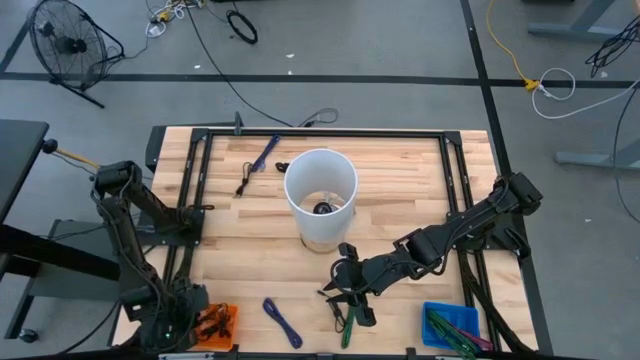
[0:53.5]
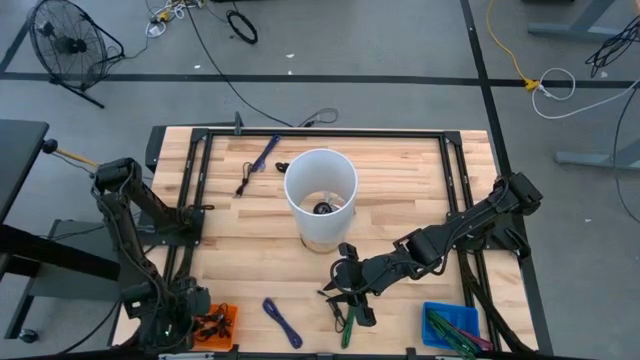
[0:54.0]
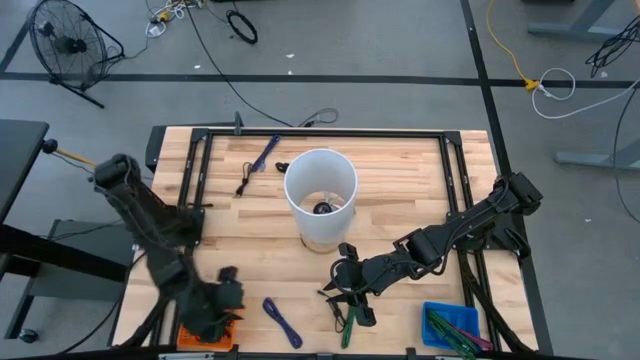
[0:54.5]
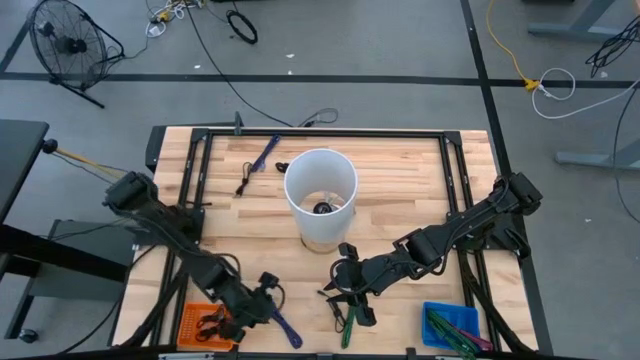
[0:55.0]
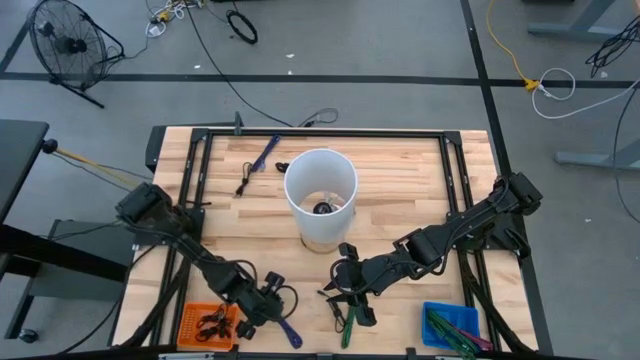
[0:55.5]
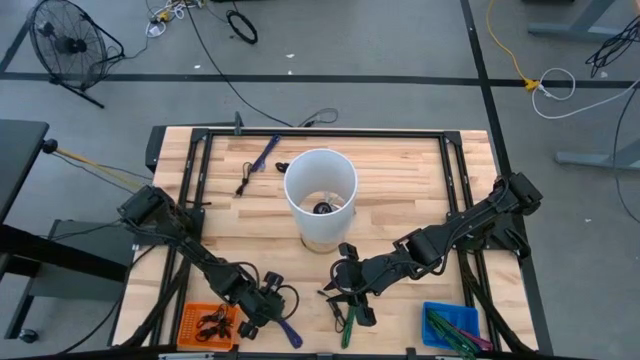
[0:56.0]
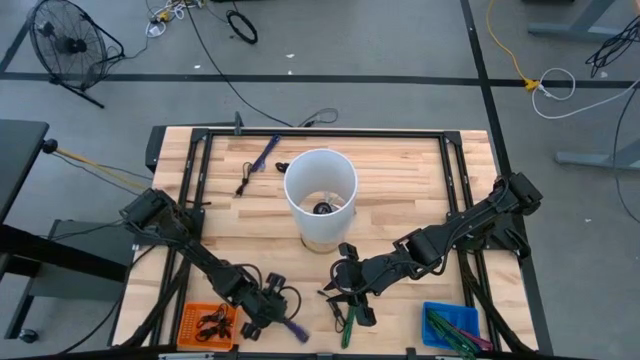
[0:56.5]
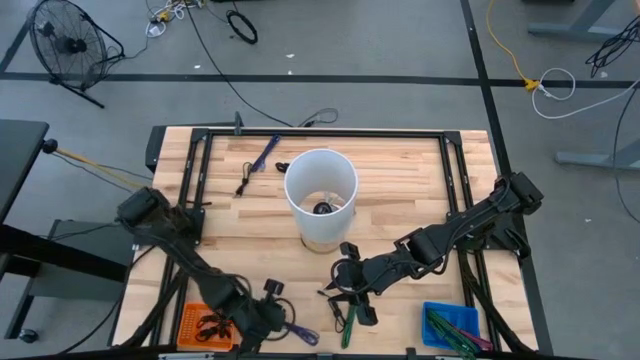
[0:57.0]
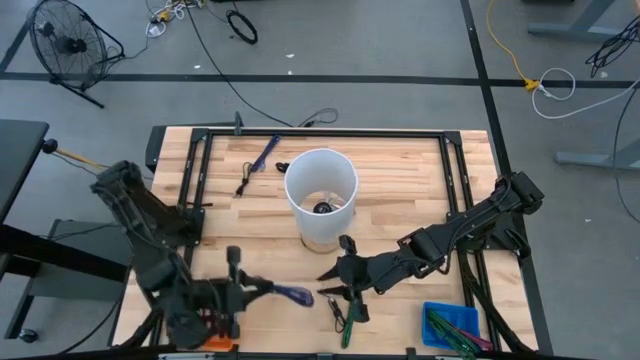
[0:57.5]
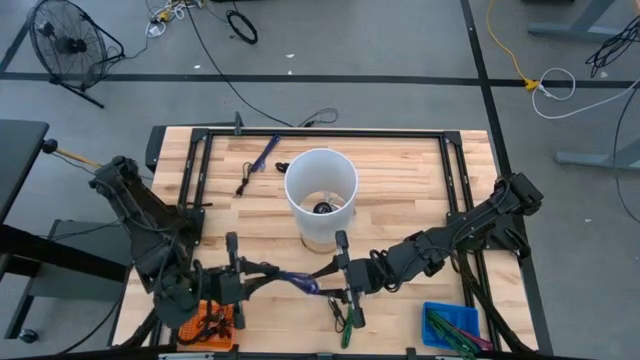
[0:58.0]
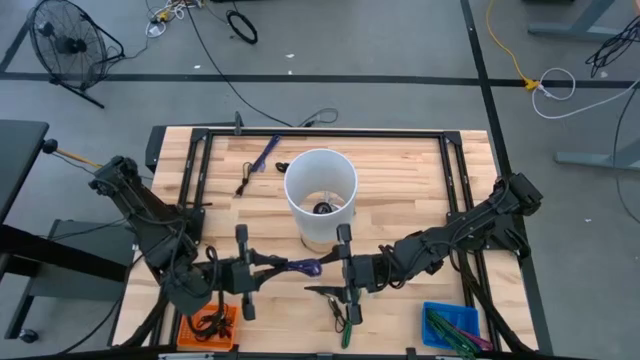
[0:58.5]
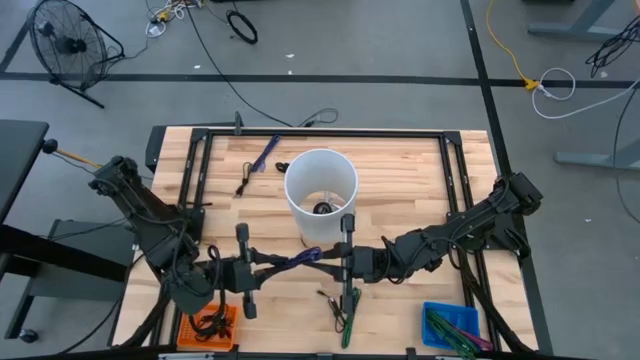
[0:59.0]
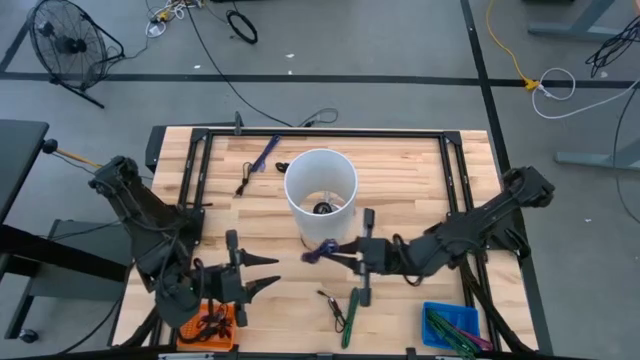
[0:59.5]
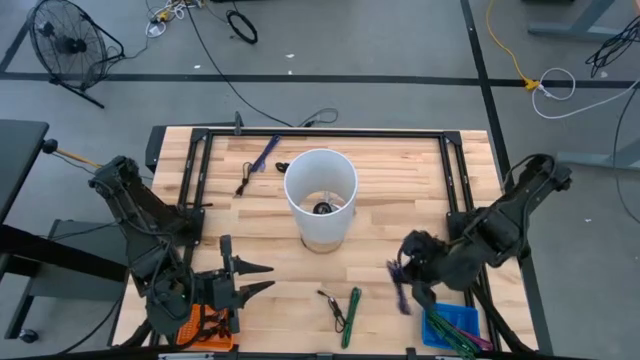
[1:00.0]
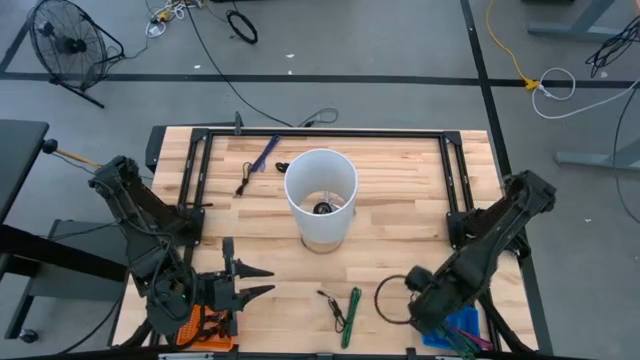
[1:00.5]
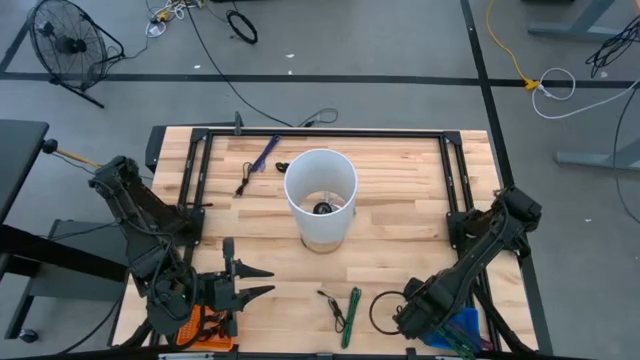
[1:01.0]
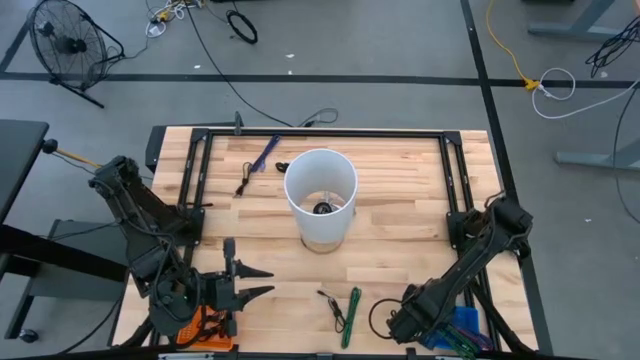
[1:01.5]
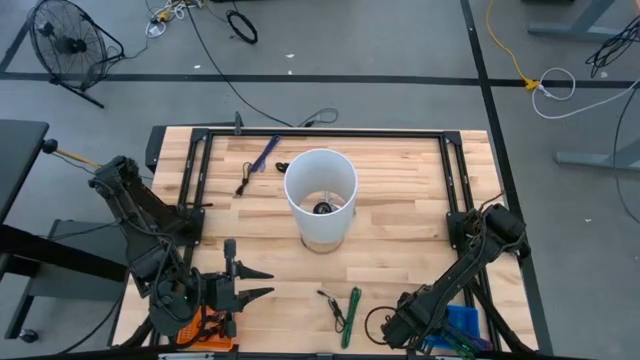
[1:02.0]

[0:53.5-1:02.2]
Task: Pick & Place USB Port
Put the black and violet charger cable into the blue bin

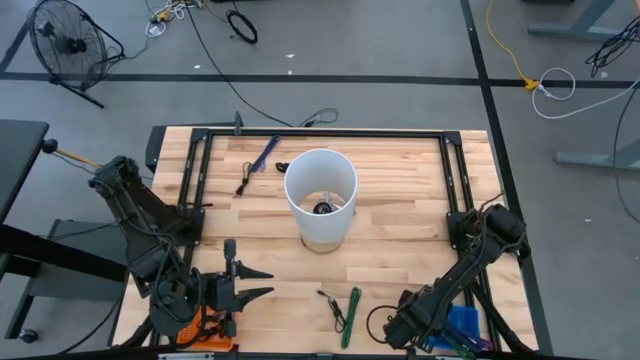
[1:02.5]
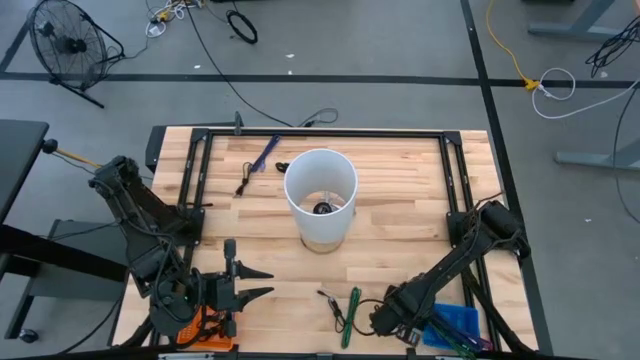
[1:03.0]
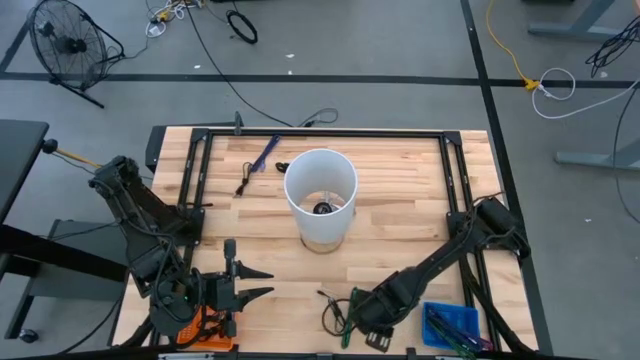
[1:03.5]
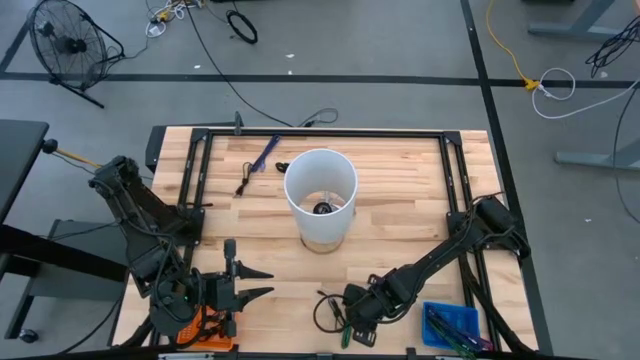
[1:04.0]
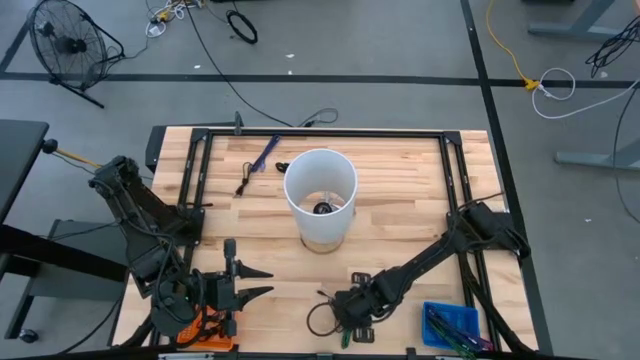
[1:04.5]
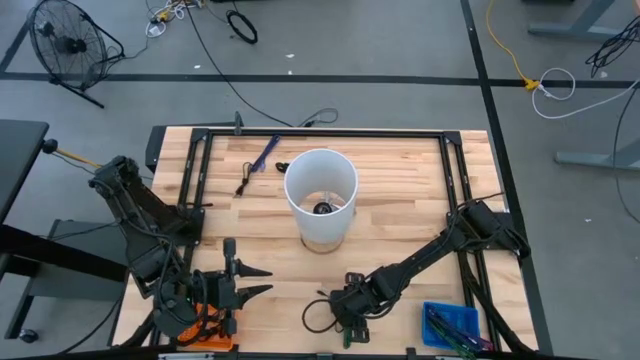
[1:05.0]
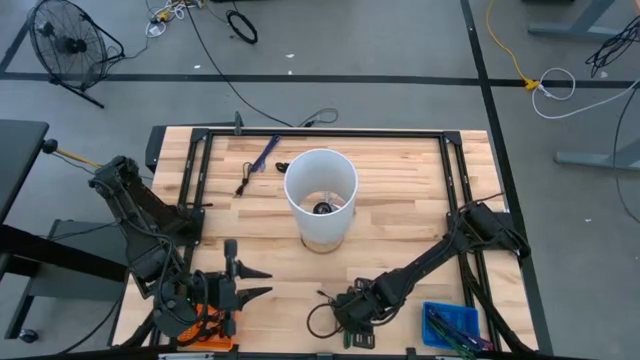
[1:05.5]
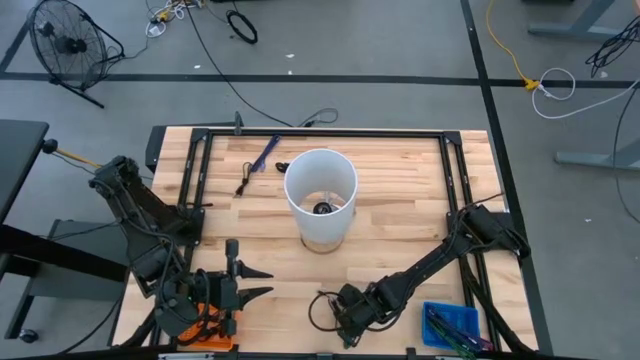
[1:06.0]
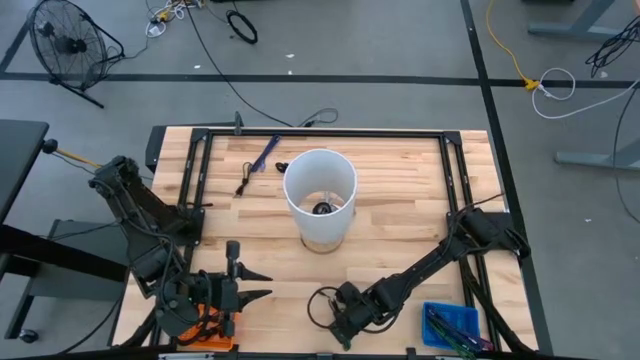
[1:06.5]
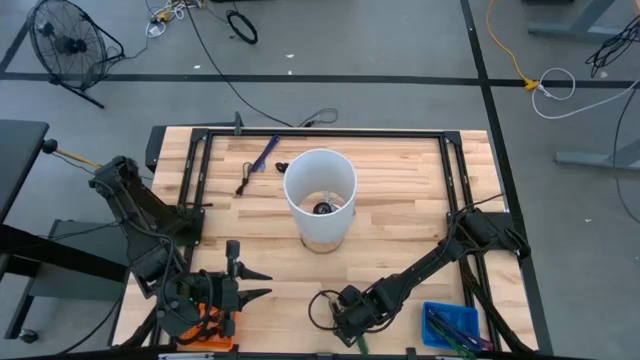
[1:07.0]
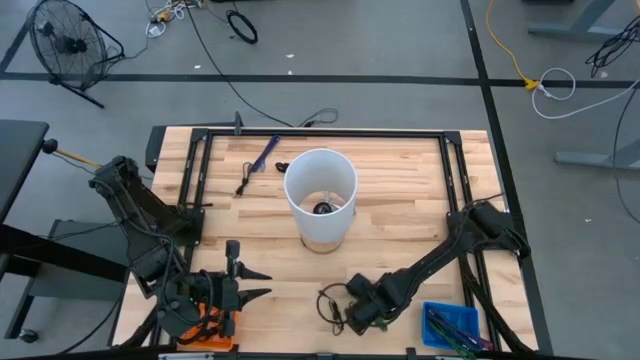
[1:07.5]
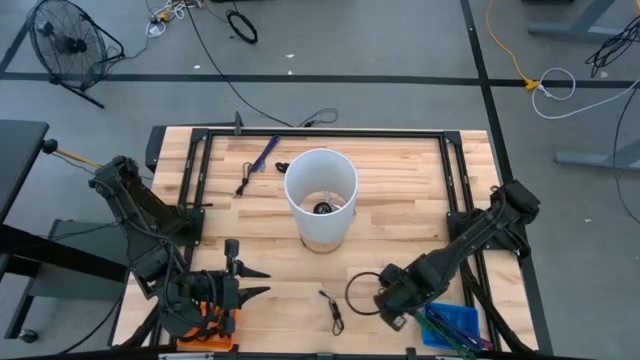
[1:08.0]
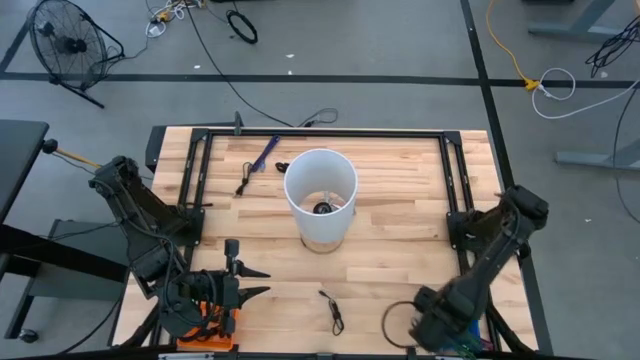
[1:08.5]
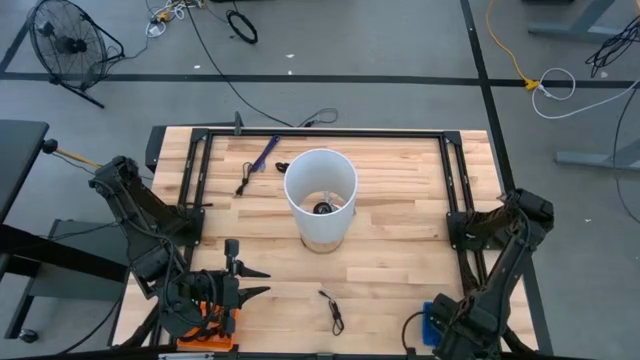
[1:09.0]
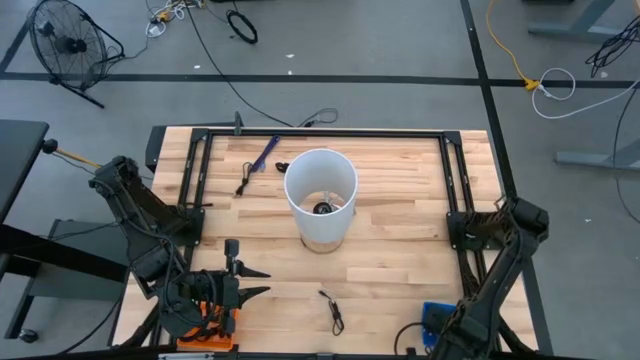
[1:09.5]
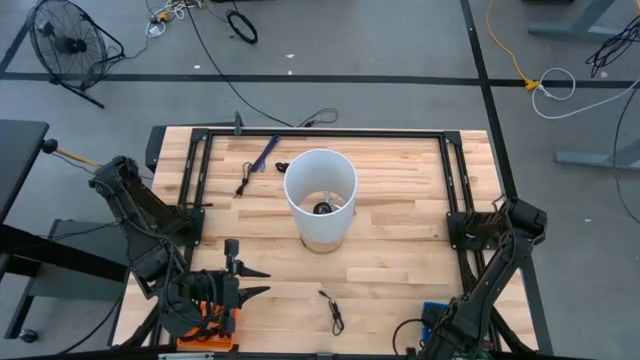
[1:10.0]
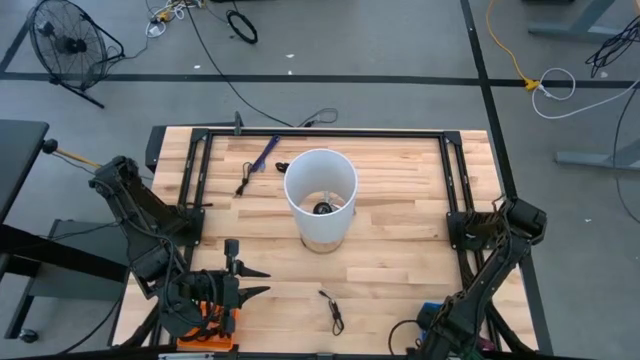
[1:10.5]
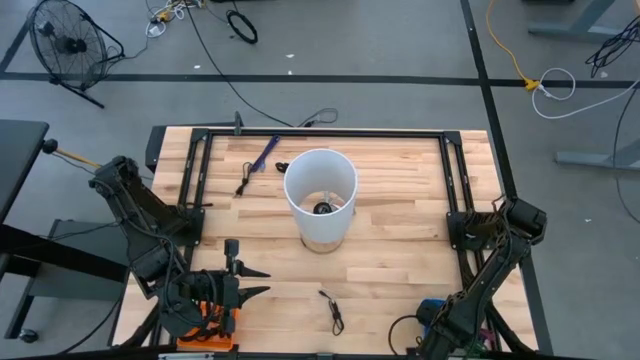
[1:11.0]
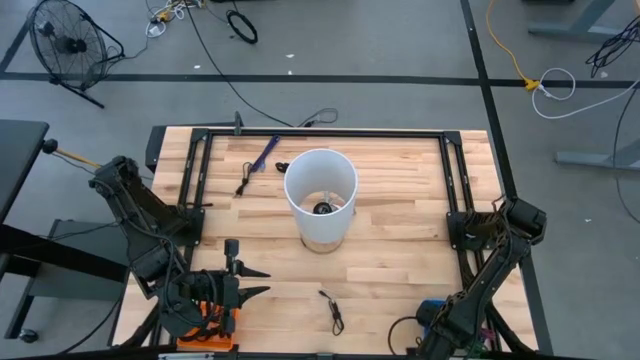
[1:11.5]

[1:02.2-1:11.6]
Put the black and green charger cable into the blue bin

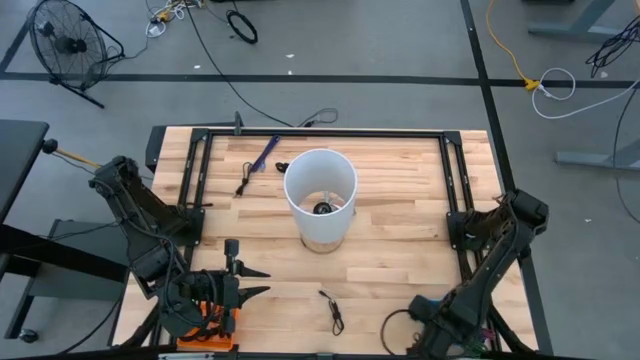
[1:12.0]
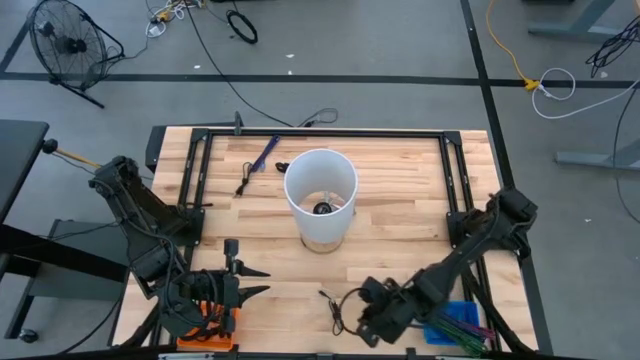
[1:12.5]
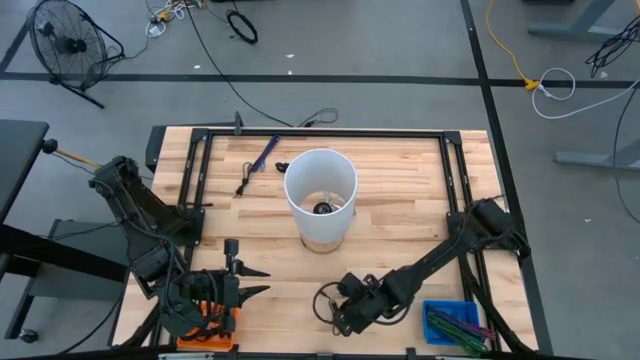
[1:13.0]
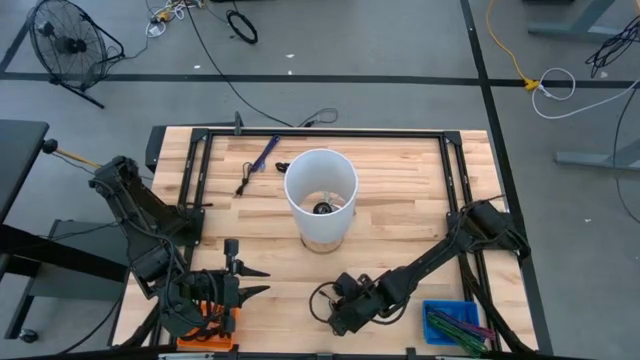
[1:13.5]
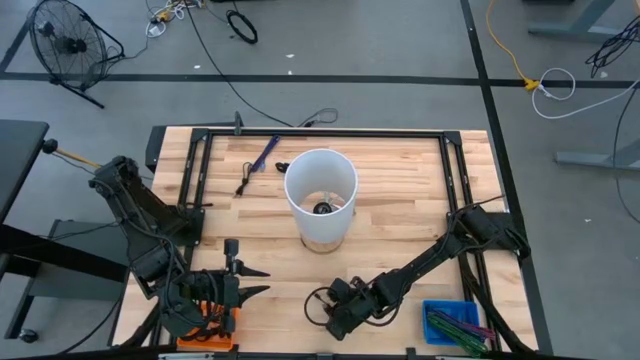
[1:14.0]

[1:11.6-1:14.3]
Put the black charger cable into the orange bin
